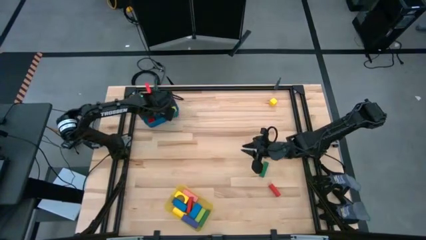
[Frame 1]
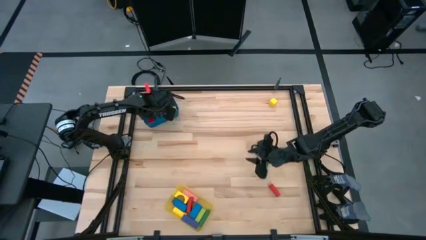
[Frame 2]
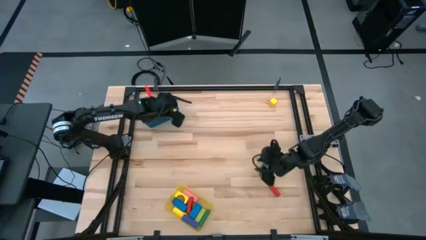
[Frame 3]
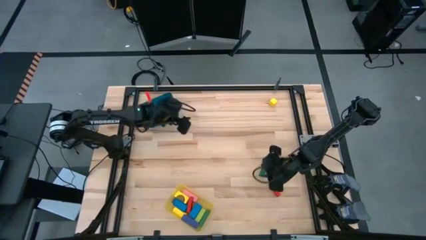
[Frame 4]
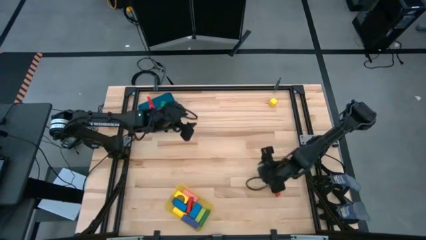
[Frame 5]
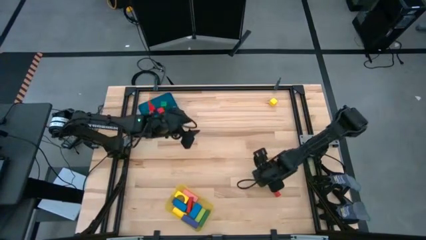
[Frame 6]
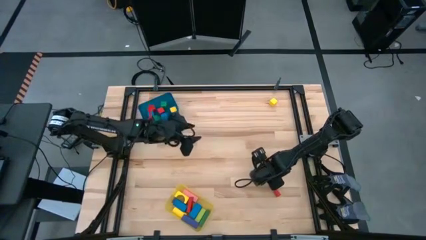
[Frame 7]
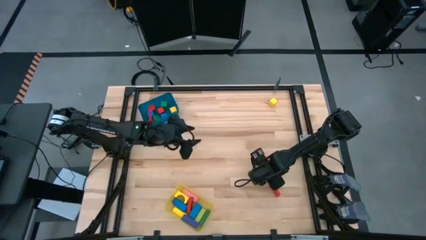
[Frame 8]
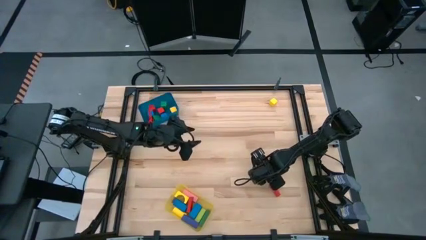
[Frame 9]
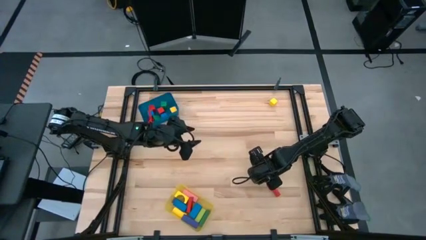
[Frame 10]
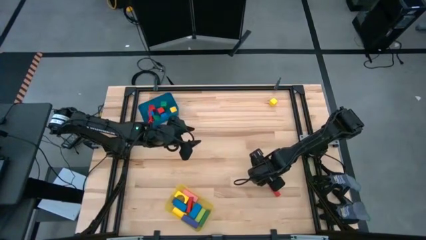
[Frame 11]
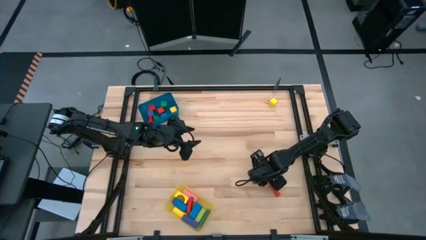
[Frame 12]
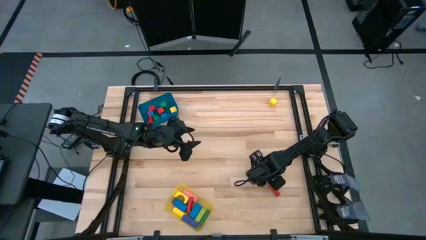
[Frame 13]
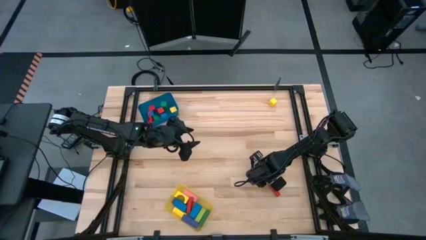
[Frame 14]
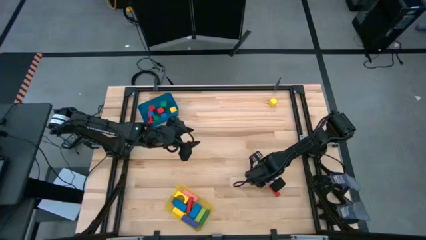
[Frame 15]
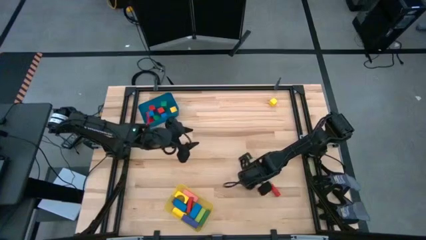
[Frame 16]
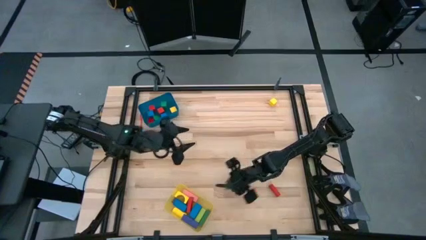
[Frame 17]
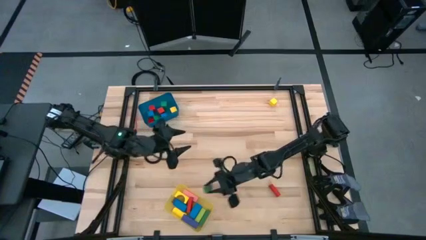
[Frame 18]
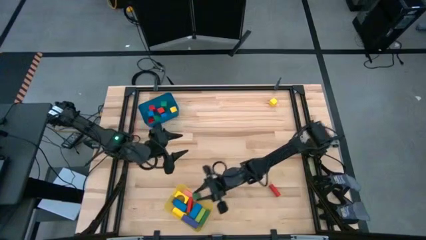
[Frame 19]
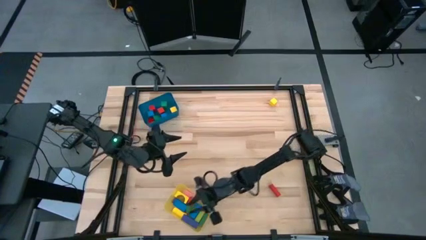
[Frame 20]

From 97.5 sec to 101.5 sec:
Task: Sort blocks by size
Put the large green block into the yellow bin

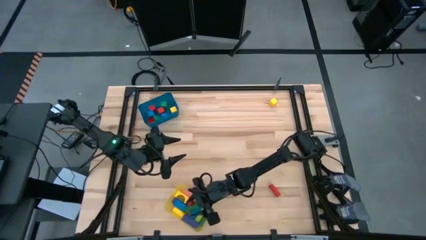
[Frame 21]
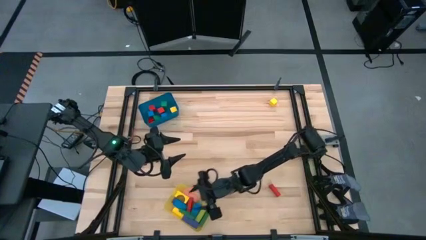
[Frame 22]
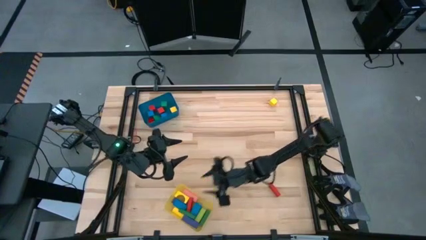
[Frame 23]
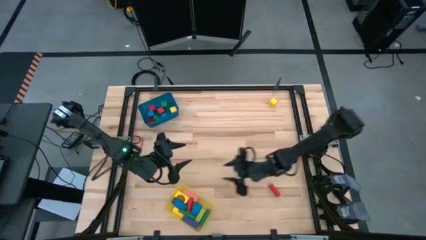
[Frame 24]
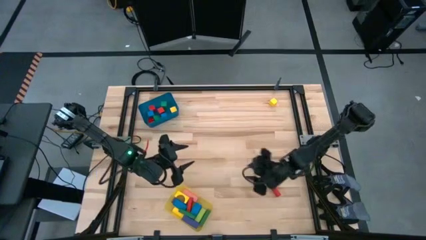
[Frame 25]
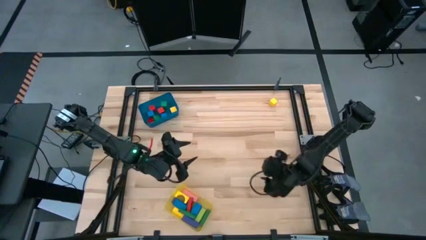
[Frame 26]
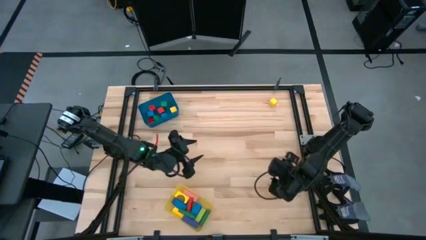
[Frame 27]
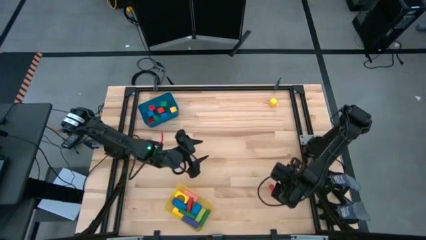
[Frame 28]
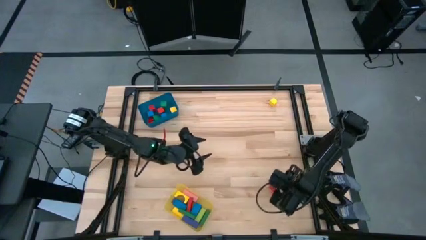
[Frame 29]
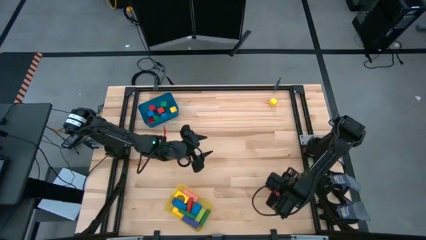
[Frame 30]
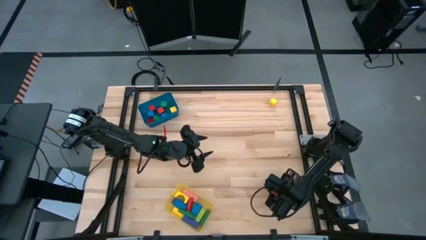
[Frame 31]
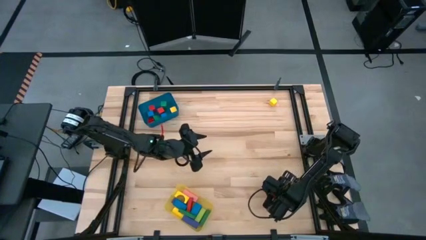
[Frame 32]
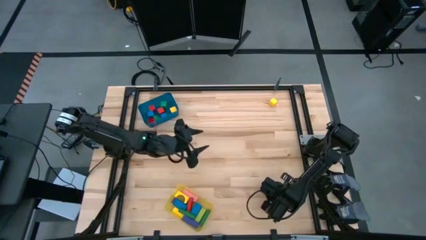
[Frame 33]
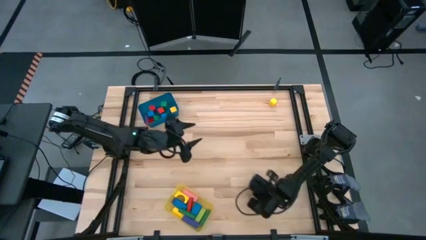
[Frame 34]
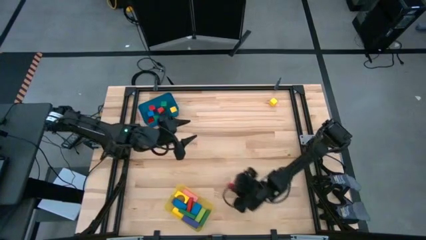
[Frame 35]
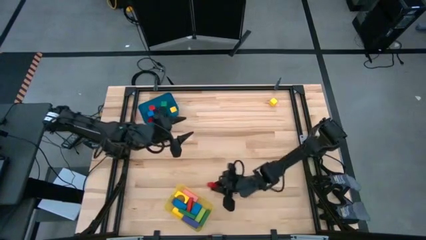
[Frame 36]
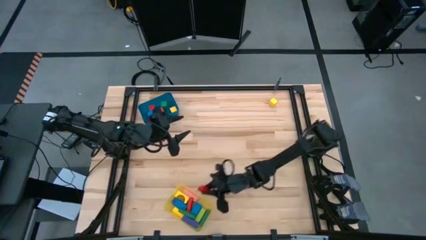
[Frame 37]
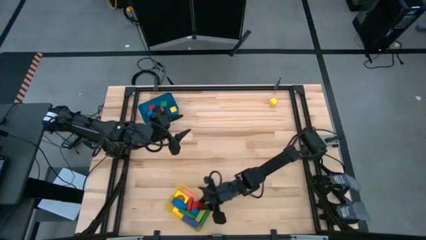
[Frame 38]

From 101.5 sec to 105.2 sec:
Put the large red block into the yellow bin

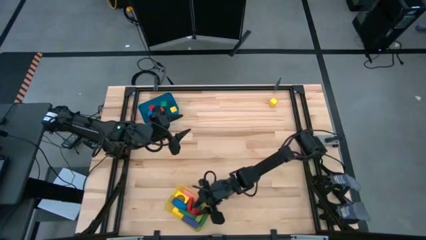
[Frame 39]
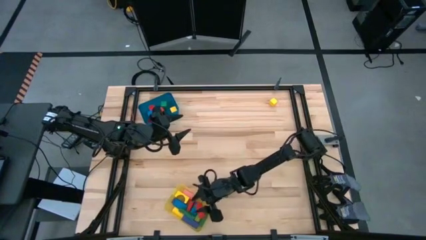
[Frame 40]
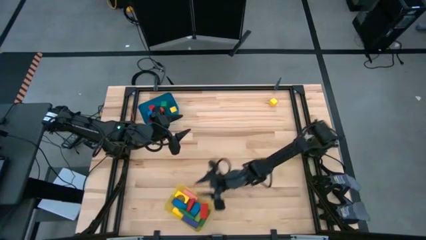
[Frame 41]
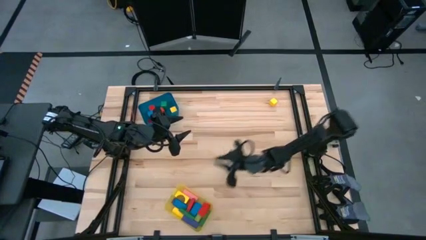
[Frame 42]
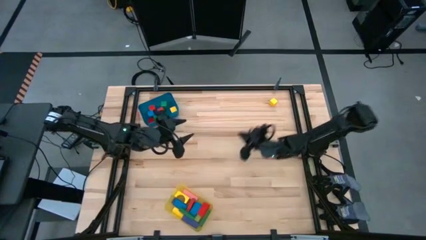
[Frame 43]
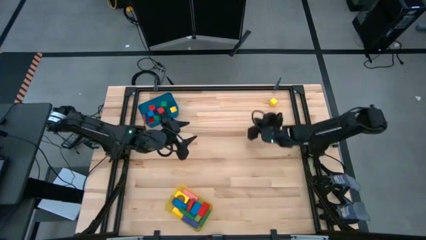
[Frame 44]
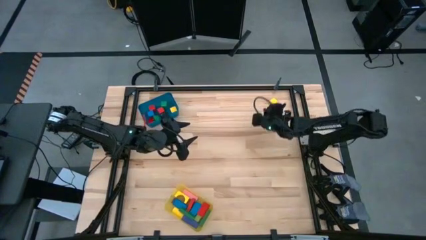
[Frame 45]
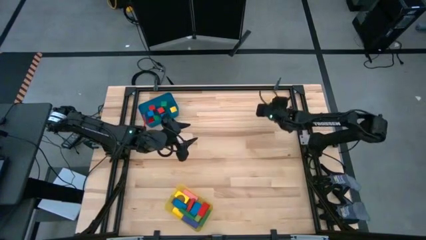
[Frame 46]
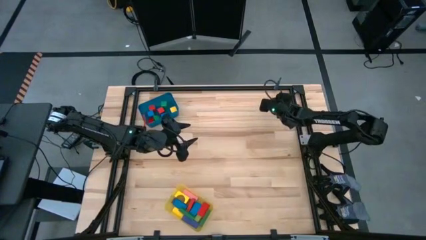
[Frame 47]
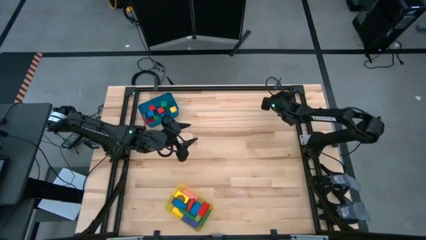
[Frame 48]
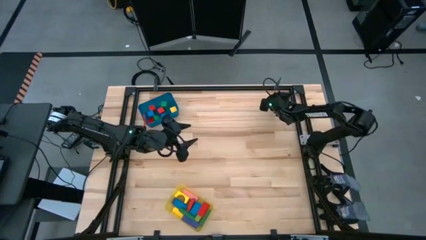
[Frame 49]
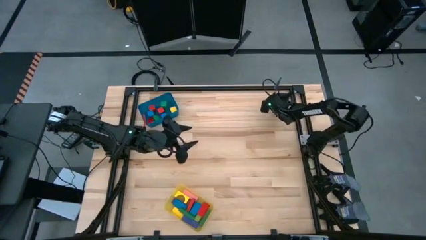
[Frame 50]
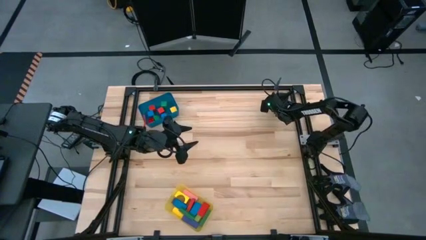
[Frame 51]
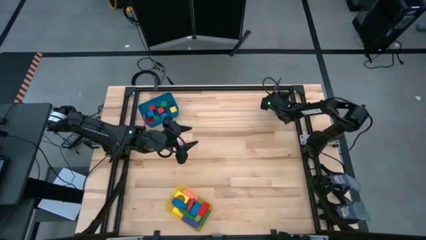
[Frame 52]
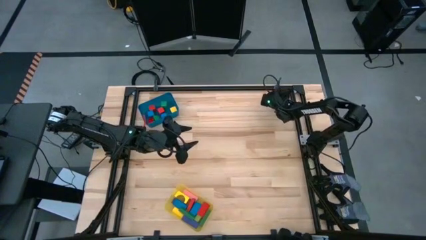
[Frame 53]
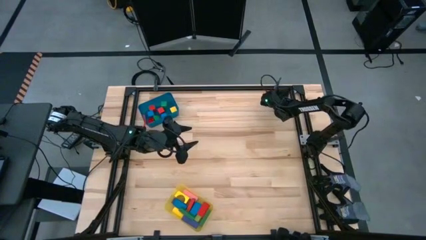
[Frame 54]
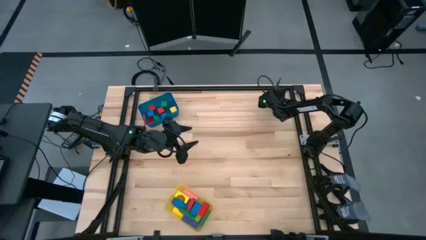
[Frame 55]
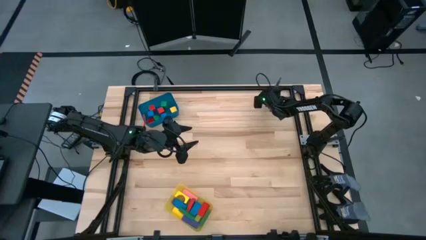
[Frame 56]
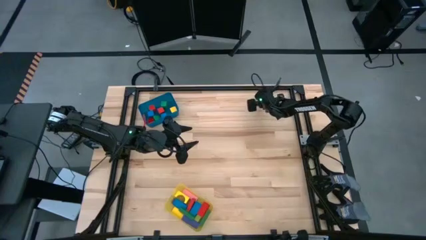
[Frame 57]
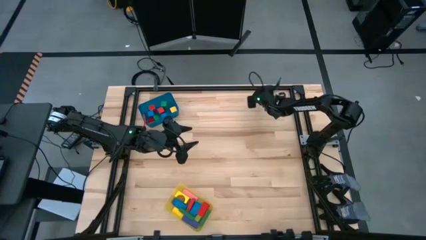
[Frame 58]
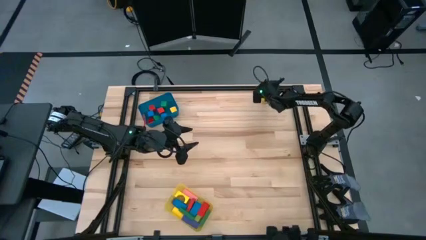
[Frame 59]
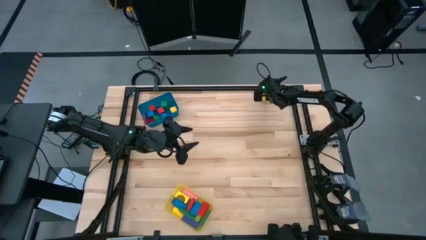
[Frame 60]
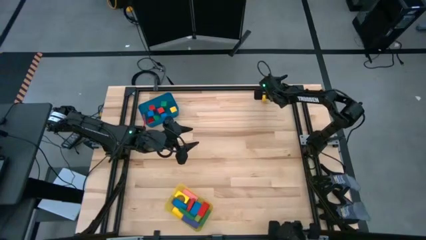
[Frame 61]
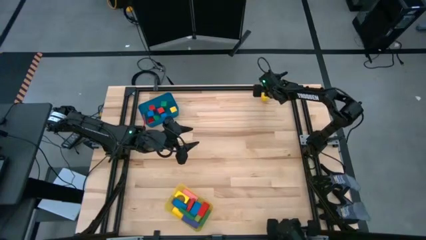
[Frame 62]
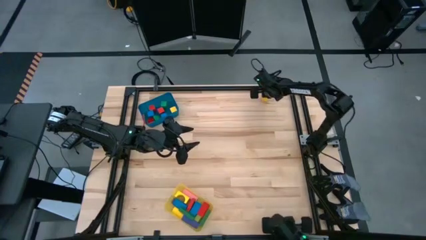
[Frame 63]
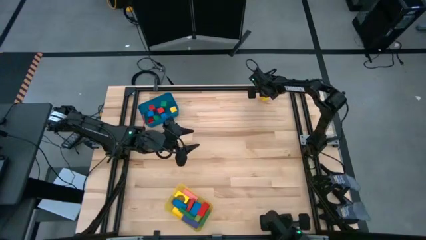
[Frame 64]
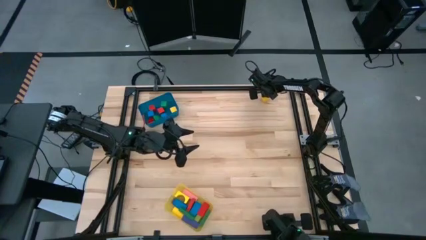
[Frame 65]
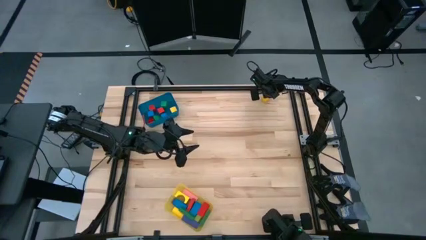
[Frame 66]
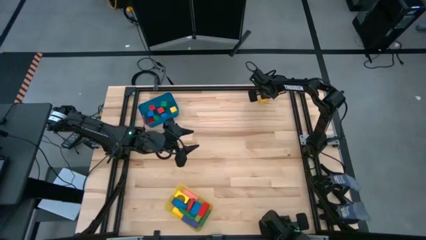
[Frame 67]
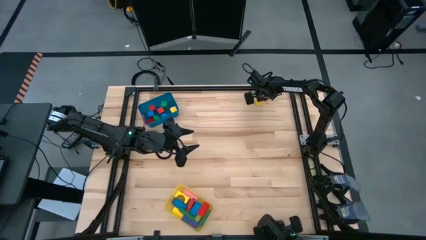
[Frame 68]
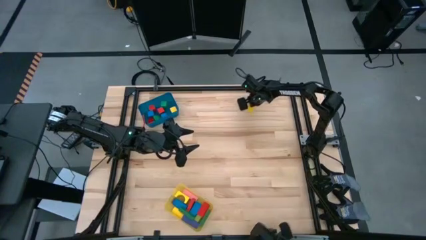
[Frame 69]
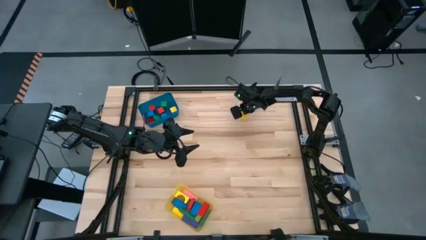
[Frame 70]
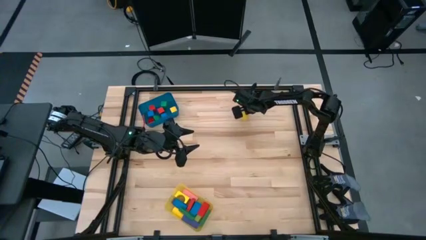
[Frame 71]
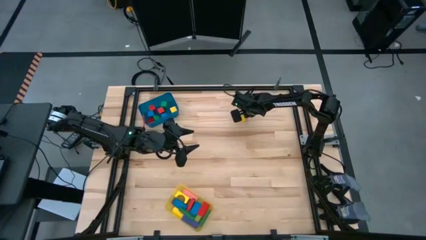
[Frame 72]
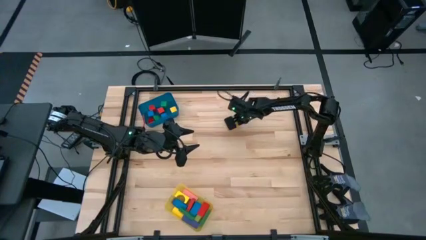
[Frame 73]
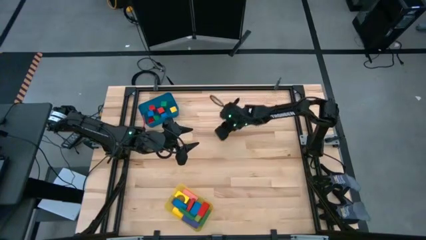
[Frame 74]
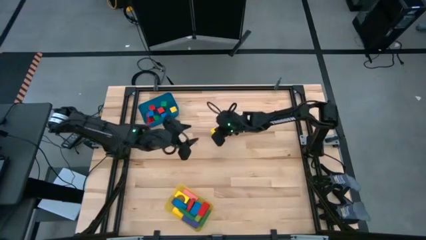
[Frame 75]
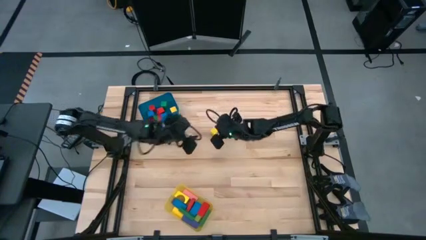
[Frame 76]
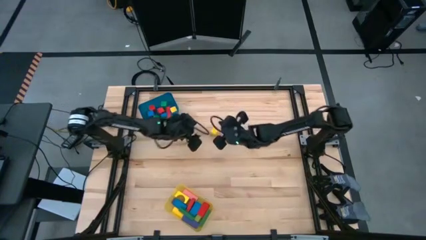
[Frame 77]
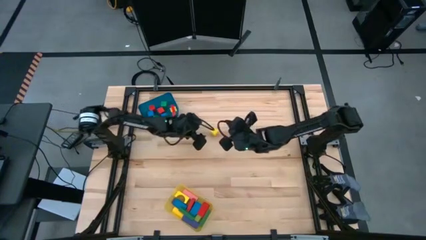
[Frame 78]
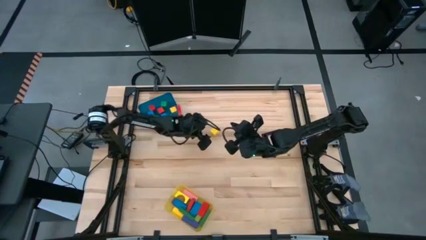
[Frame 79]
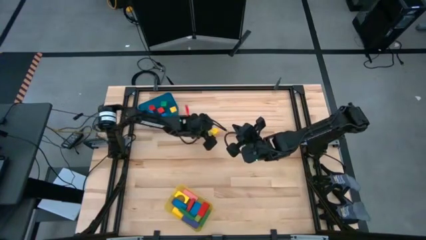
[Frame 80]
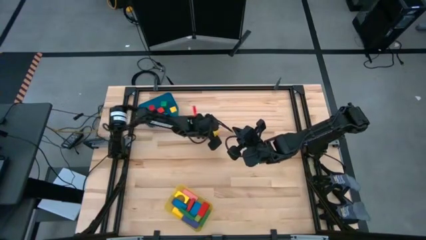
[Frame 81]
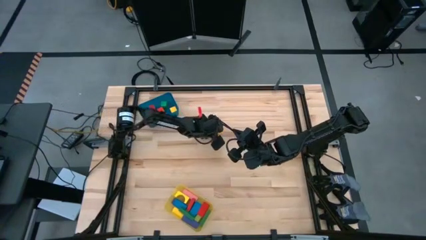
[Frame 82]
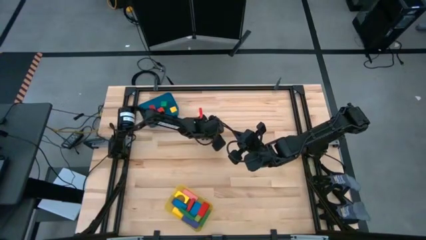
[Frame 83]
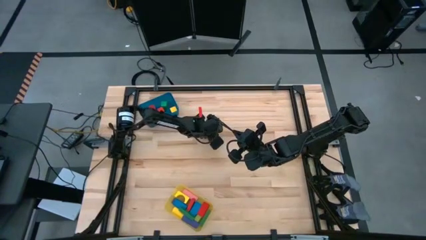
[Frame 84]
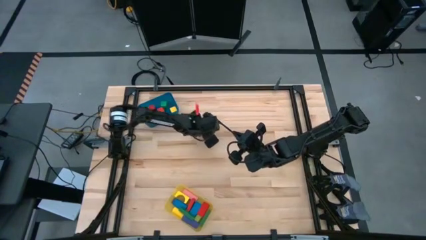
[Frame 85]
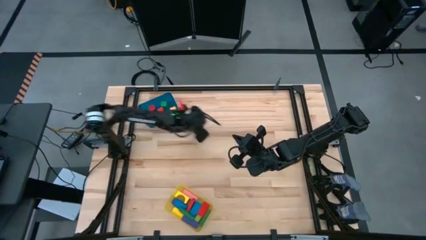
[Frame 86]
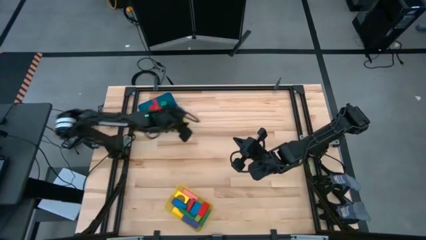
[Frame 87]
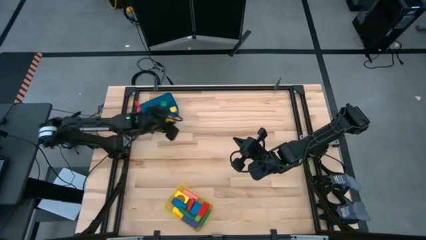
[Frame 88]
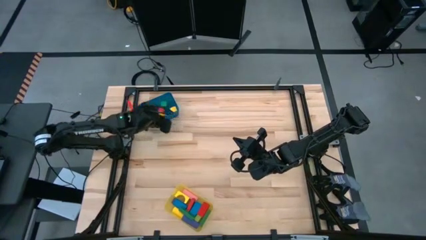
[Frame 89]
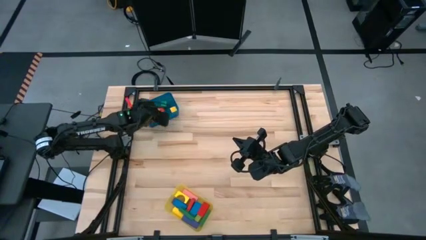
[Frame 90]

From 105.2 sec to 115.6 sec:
Put the small yellow block into the blue bin
